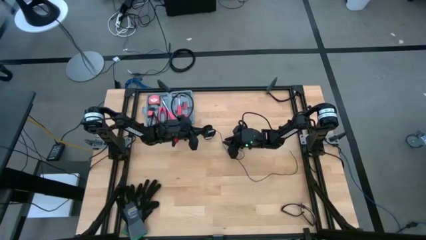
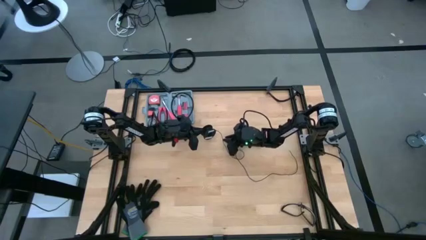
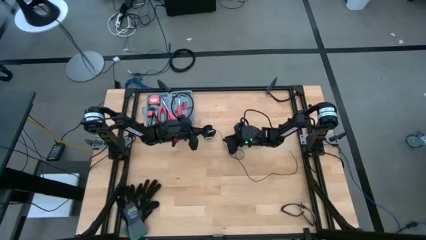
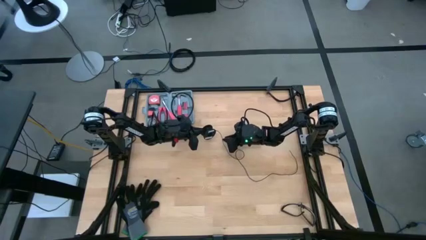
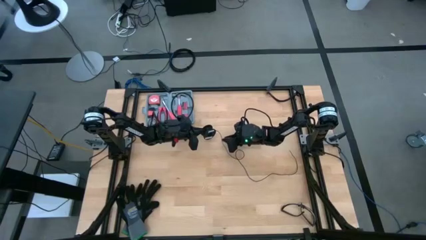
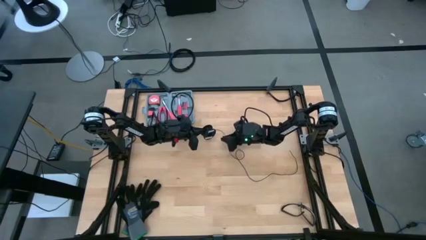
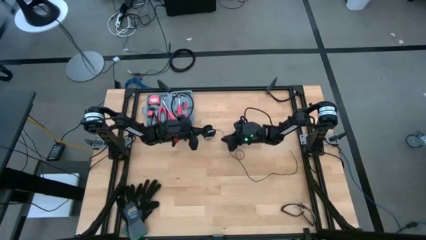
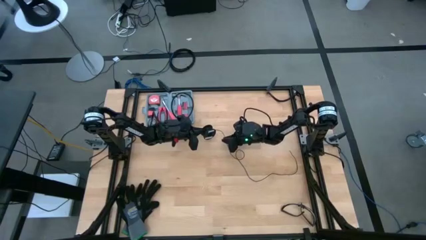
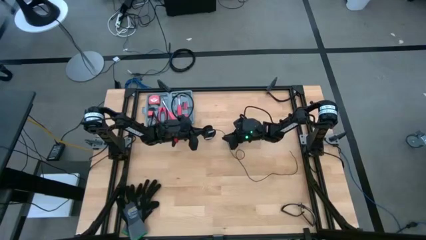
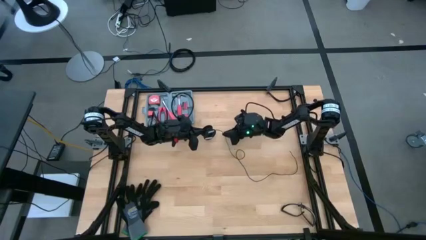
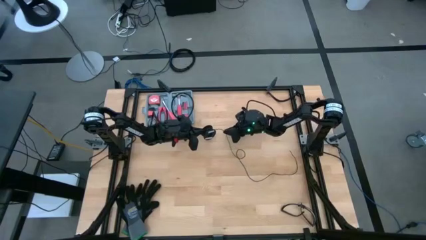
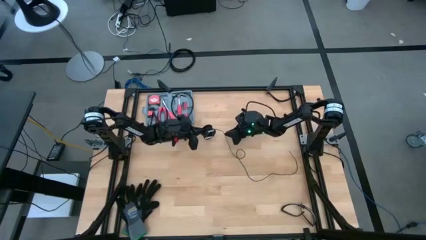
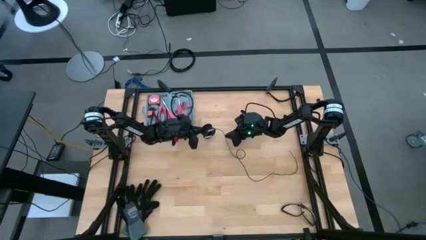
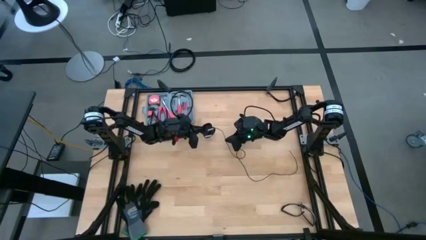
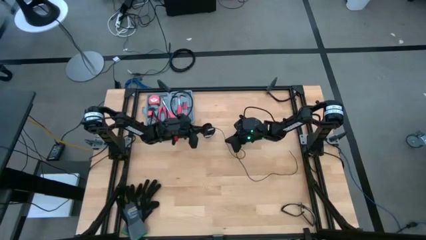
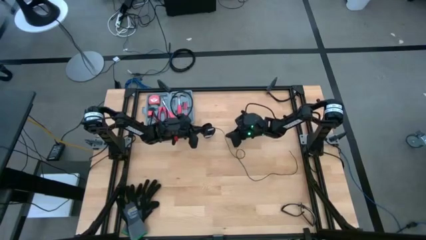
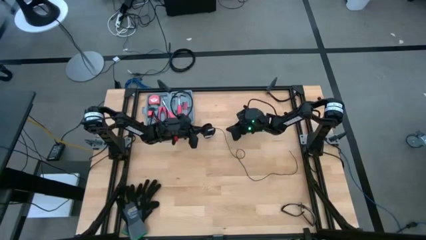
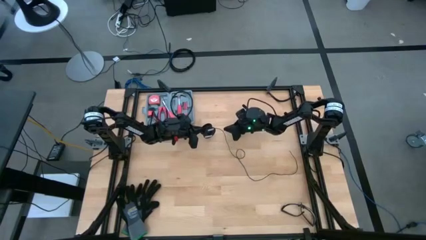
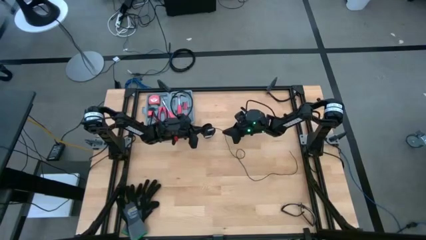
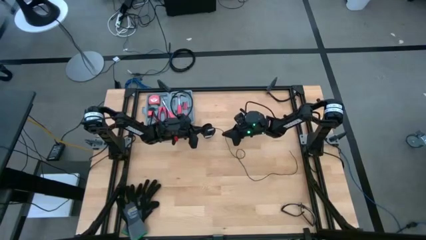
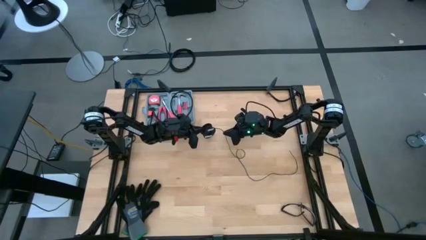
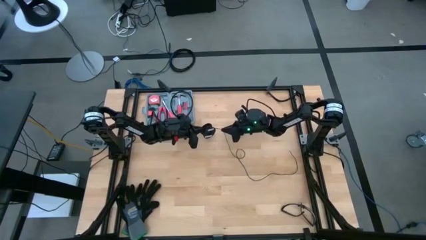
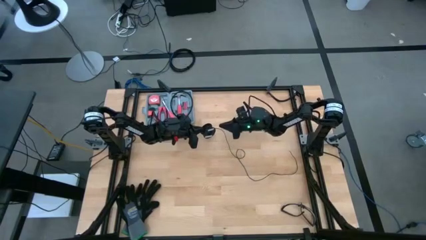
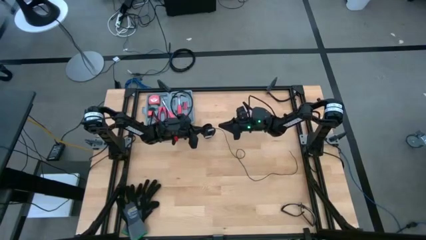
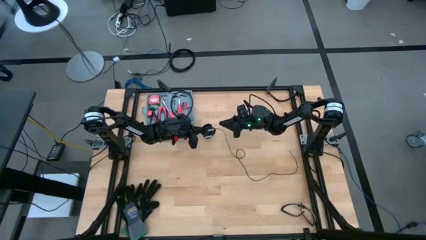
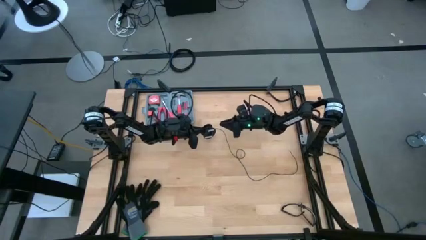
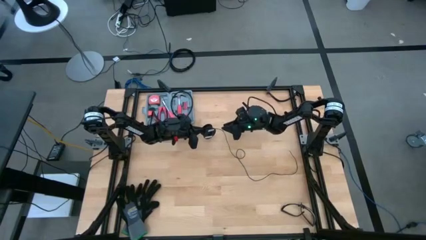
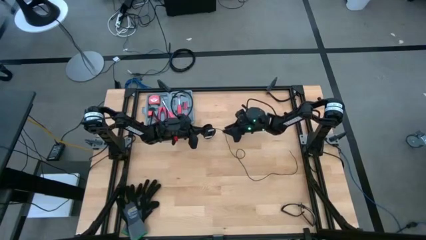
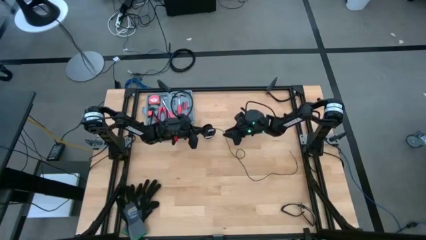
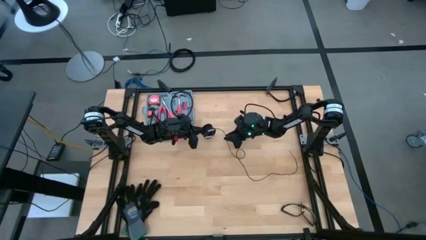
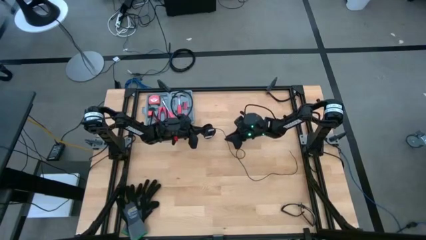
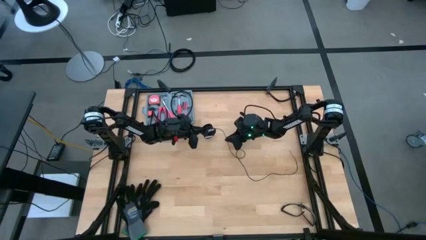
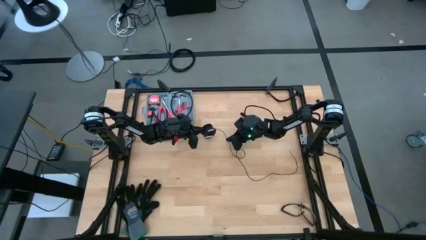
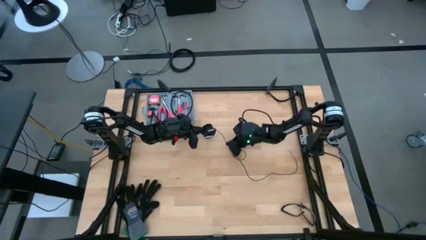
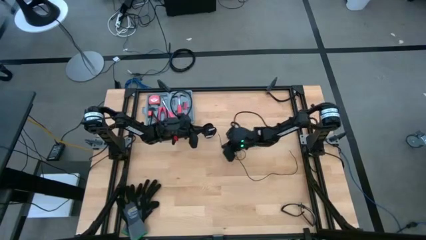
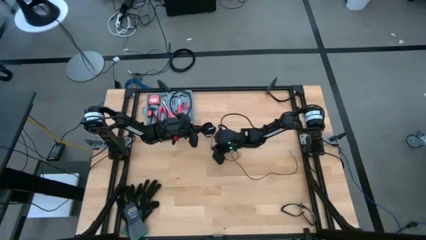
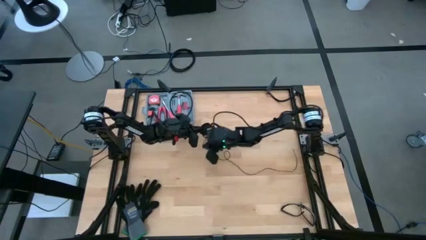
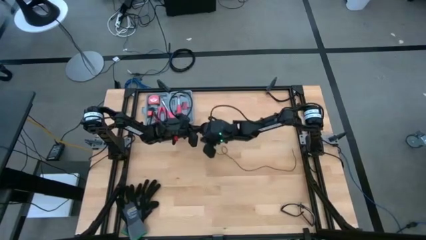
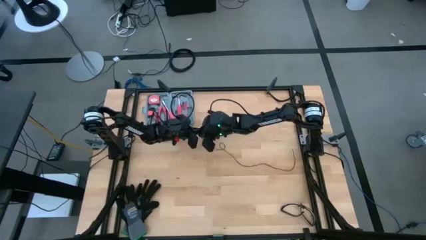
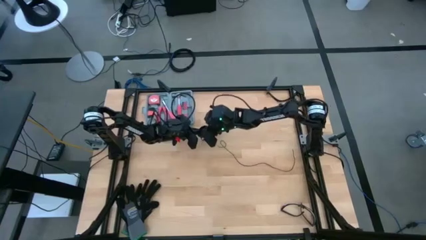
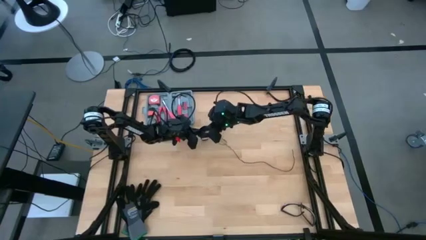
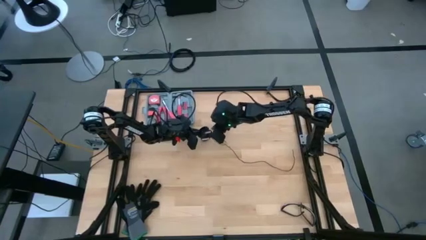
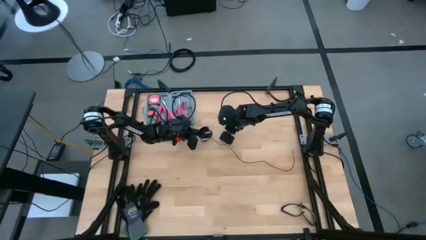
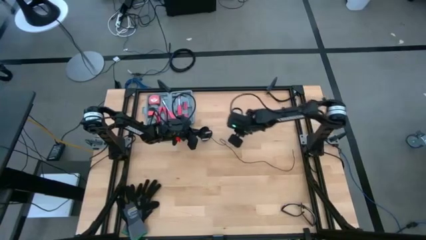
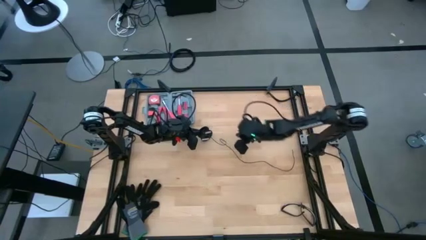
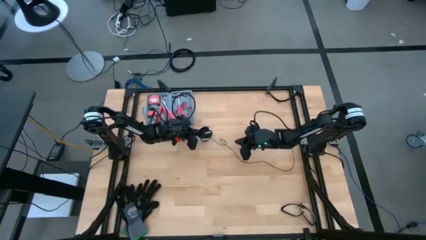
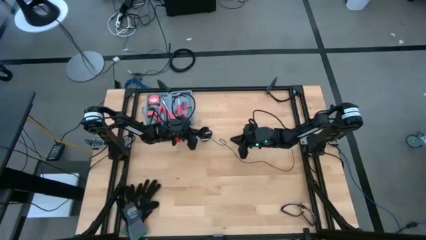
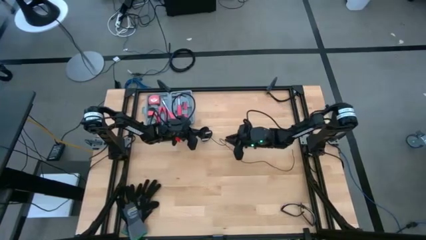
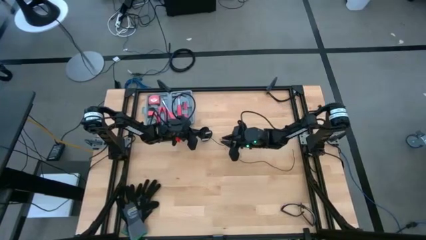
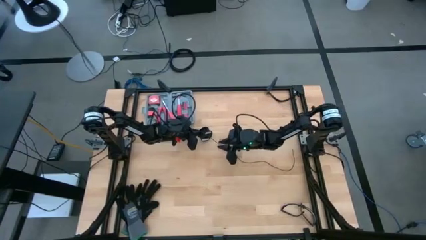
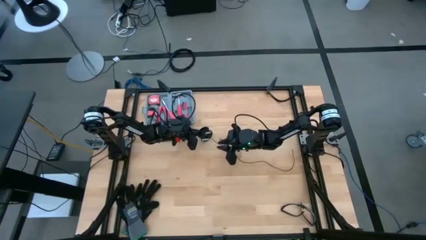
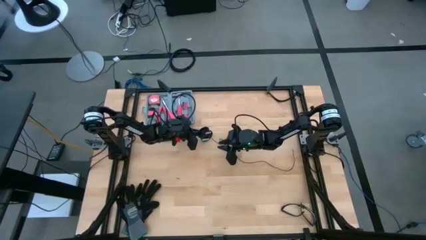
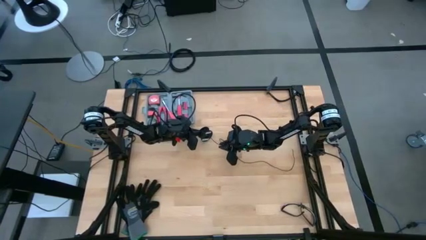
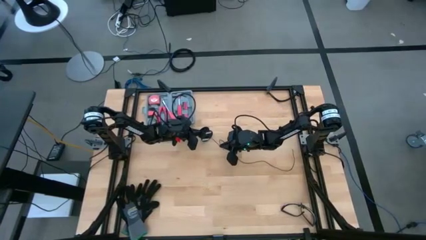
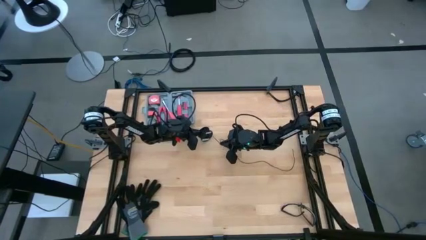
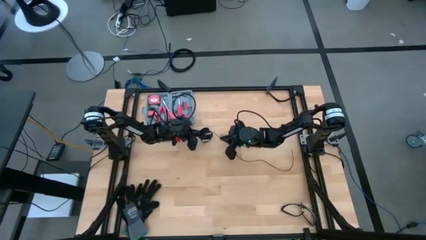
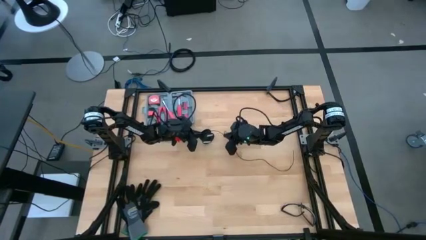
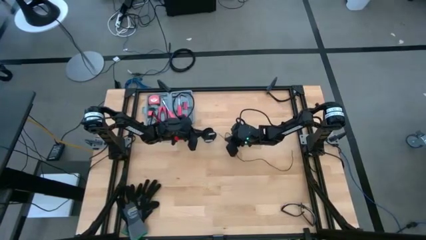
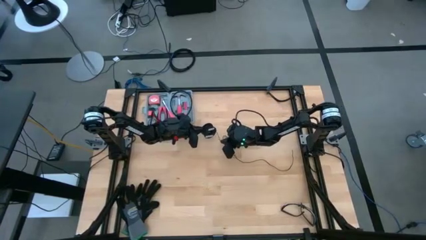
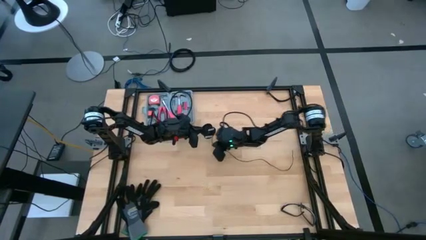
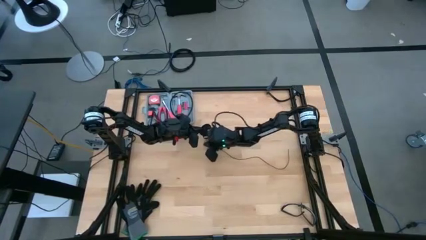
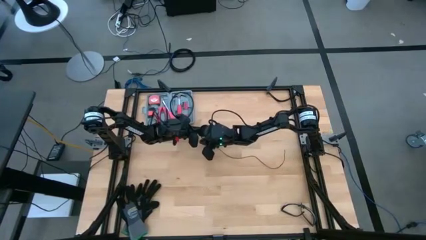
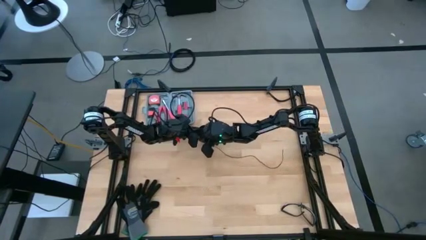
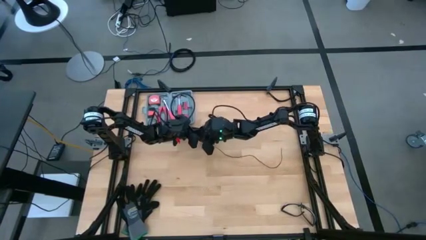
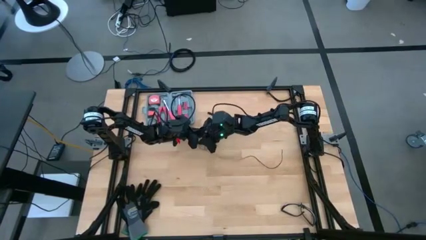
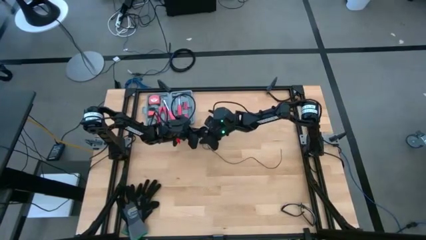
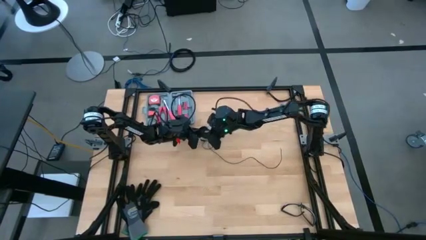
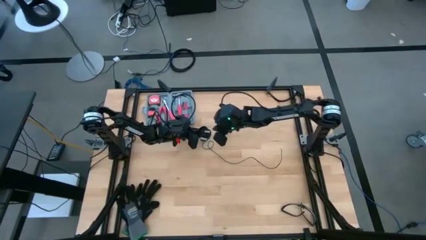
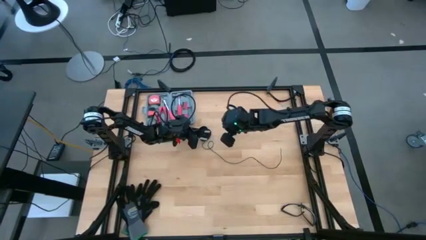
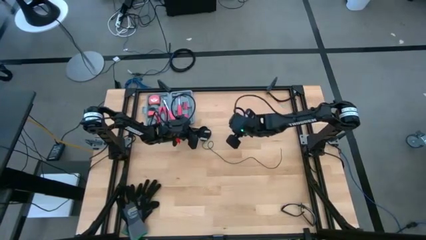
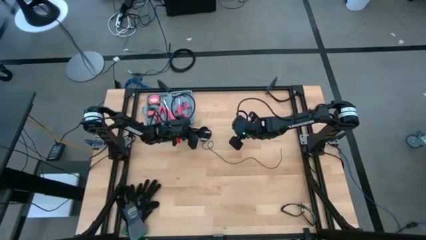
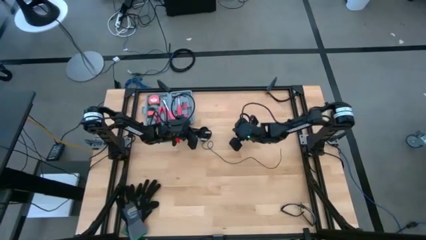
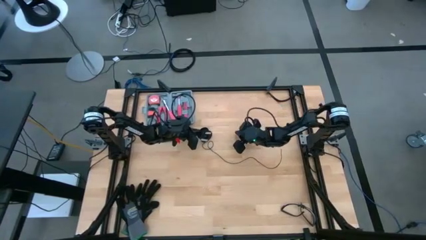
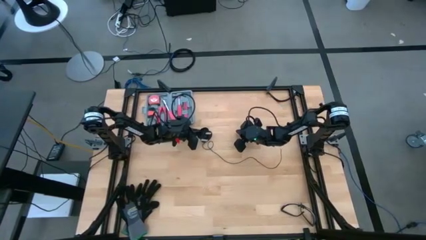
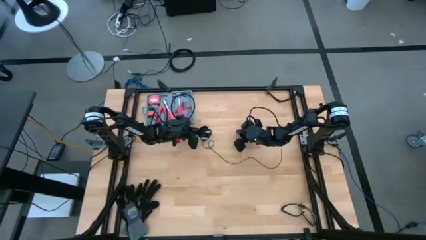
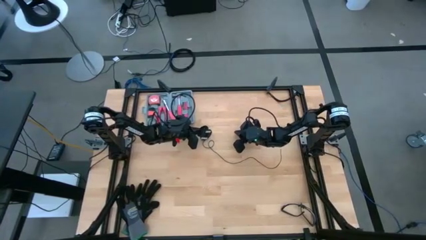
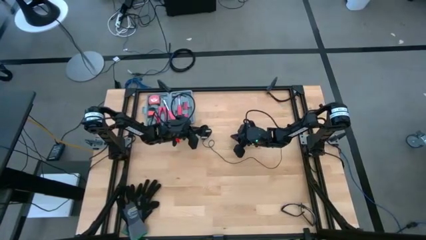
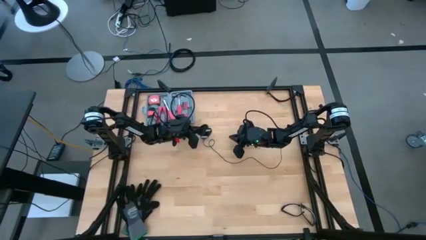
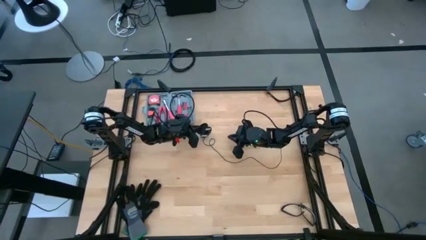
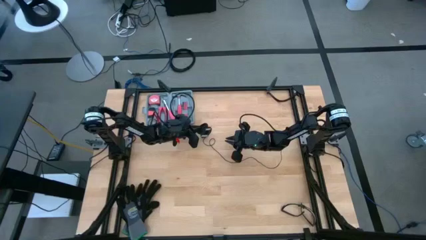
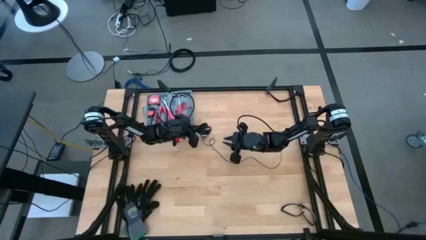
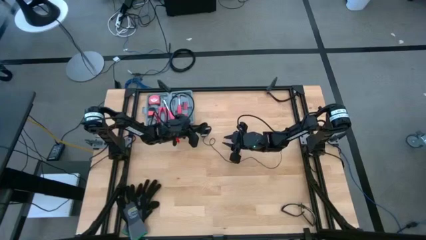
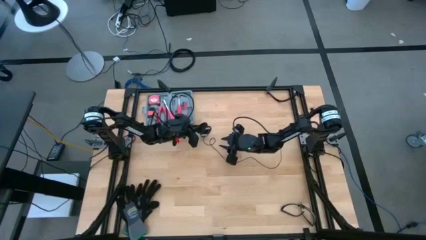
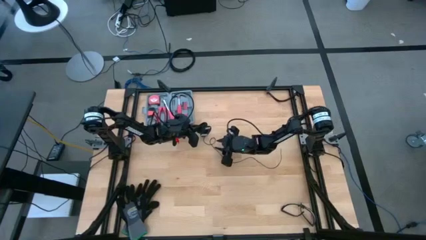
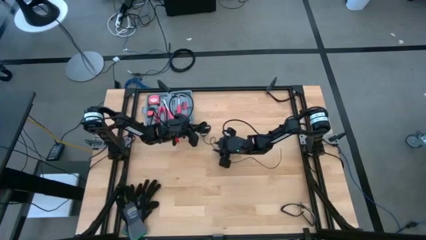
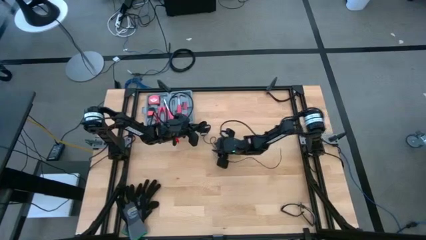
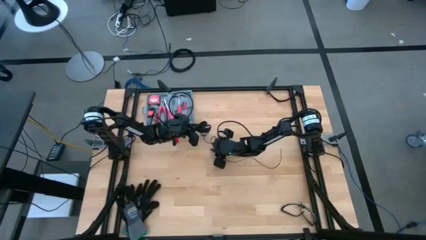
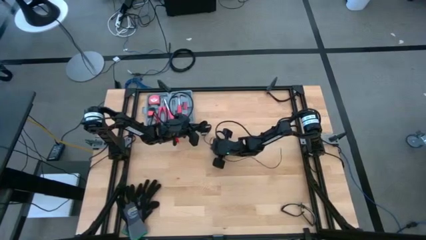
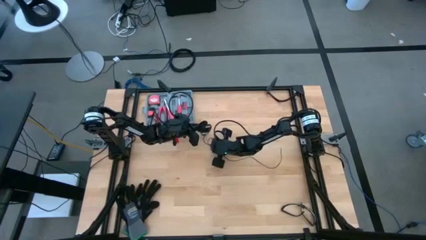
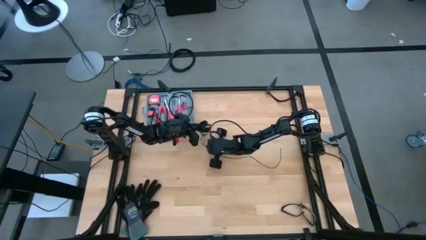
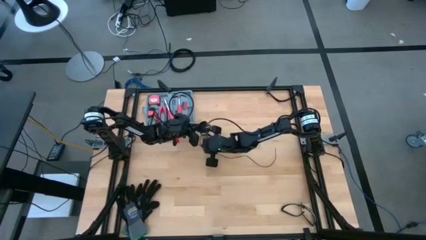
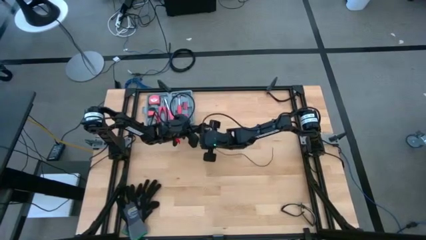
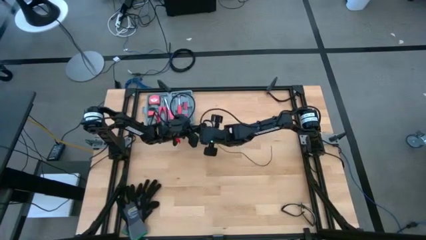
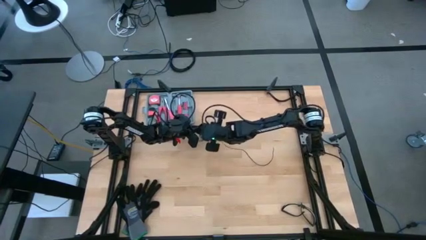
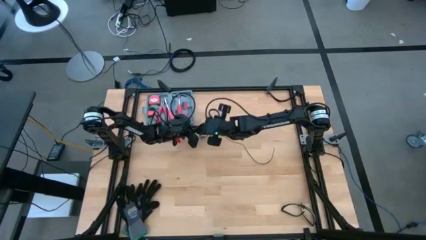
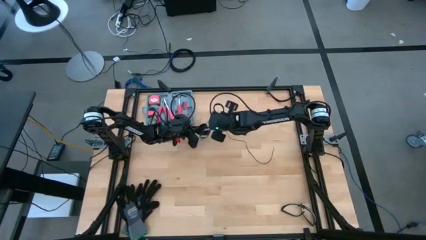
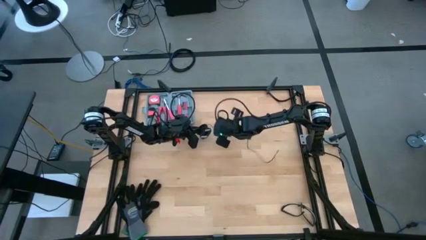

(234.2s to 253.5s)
Task: Coil cords
Coil the black wire onto the spool
